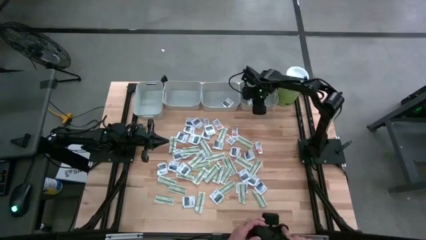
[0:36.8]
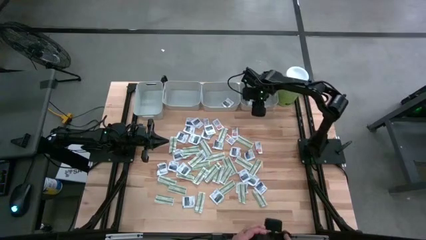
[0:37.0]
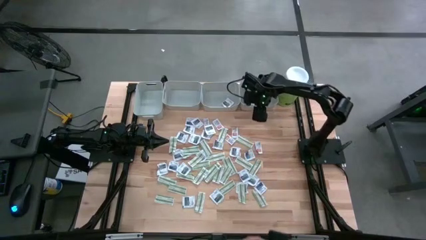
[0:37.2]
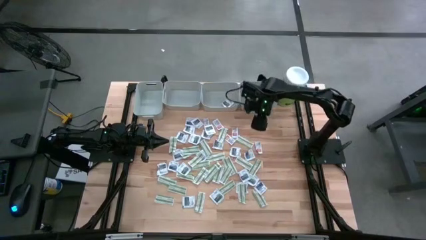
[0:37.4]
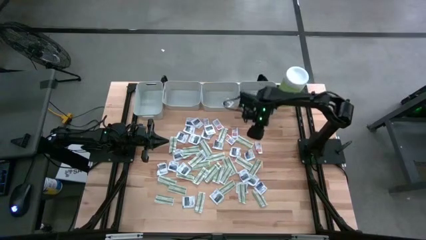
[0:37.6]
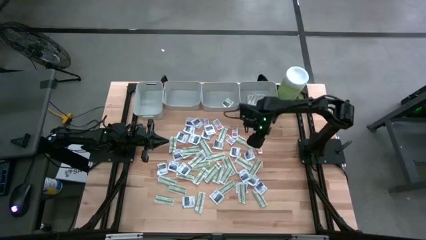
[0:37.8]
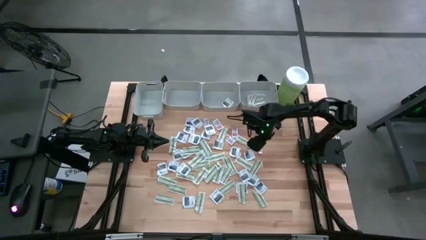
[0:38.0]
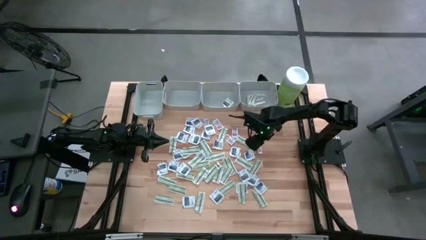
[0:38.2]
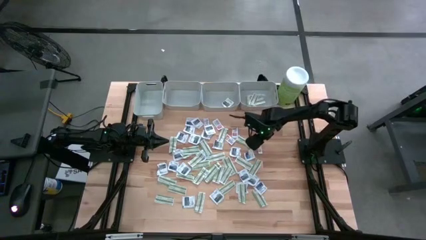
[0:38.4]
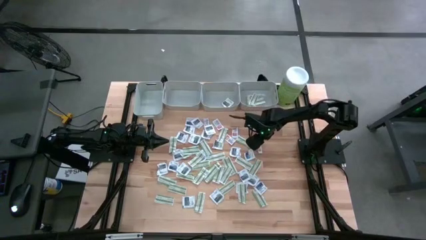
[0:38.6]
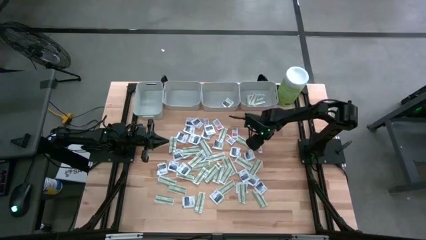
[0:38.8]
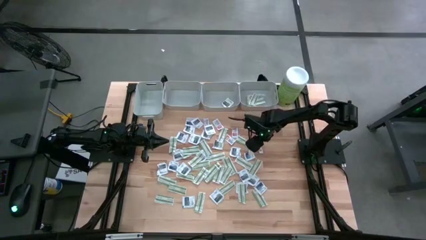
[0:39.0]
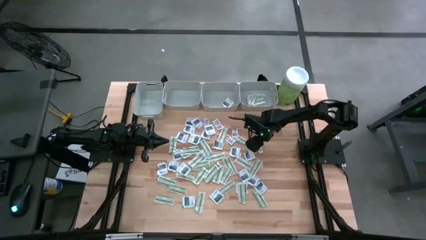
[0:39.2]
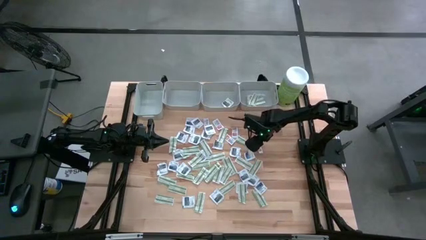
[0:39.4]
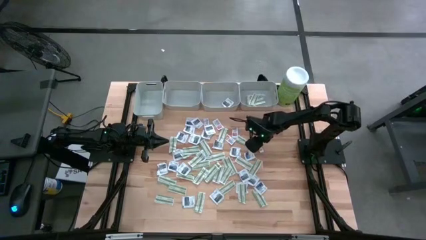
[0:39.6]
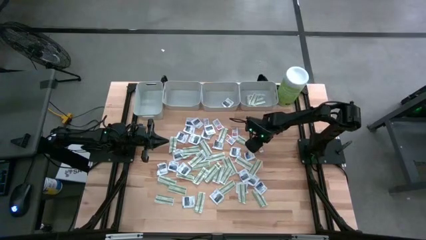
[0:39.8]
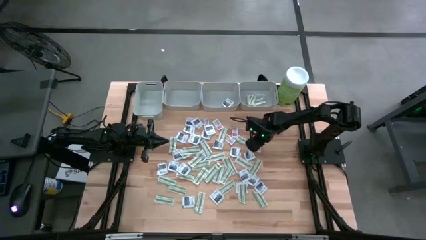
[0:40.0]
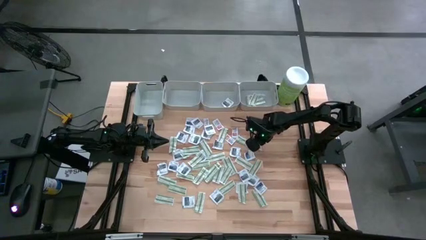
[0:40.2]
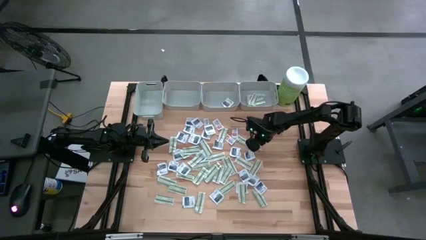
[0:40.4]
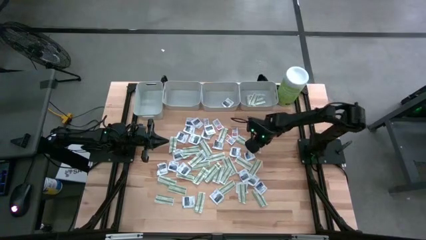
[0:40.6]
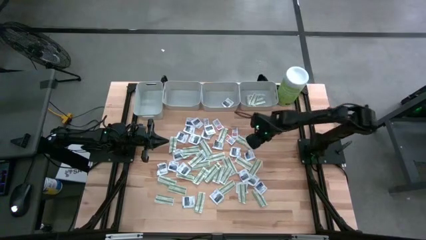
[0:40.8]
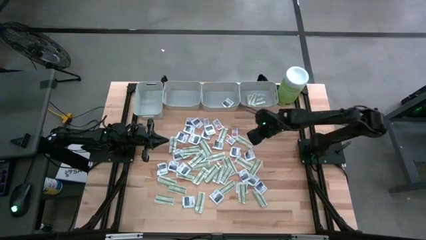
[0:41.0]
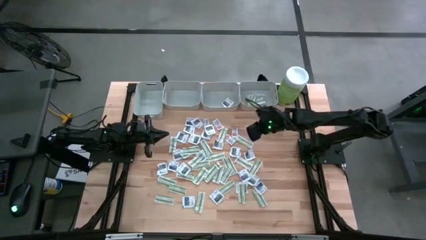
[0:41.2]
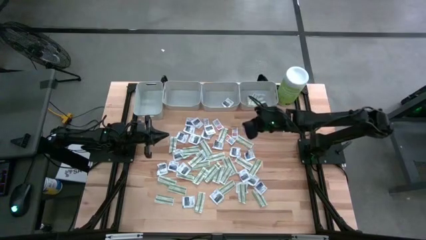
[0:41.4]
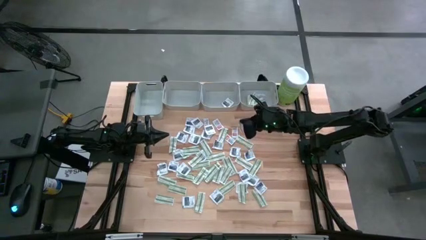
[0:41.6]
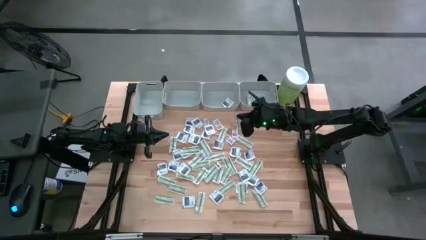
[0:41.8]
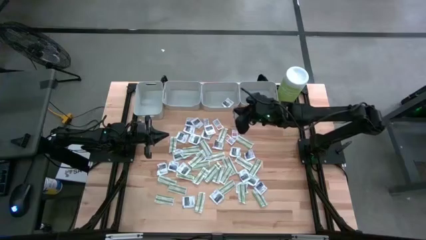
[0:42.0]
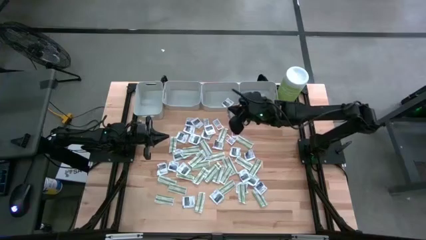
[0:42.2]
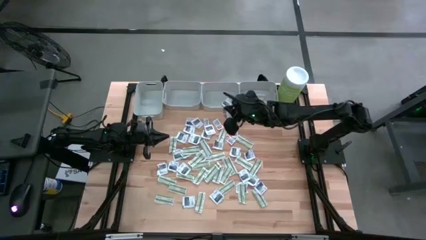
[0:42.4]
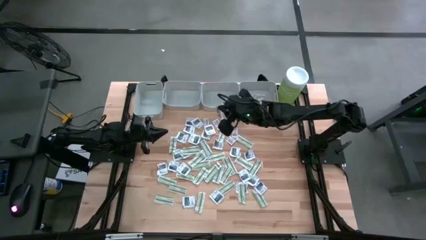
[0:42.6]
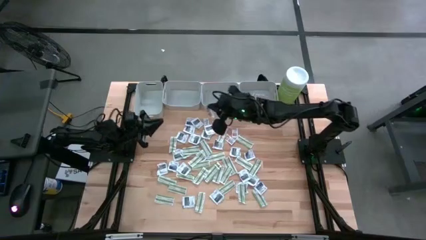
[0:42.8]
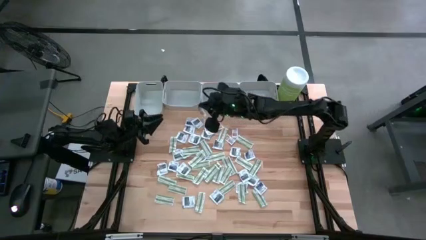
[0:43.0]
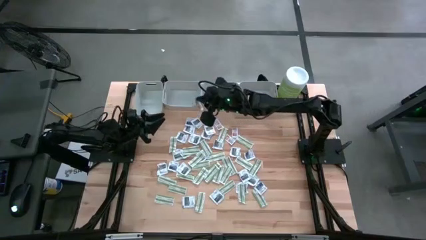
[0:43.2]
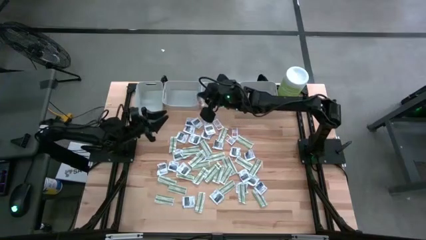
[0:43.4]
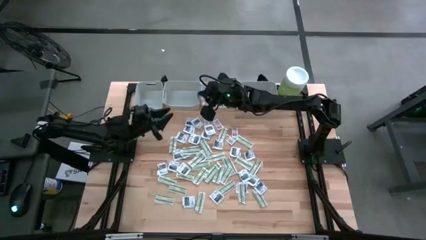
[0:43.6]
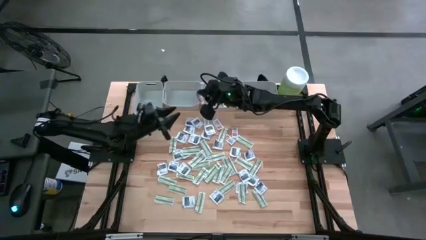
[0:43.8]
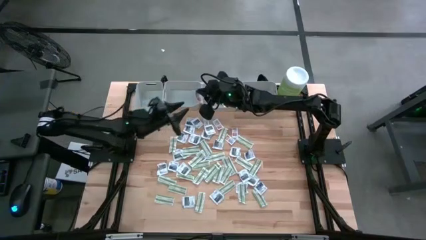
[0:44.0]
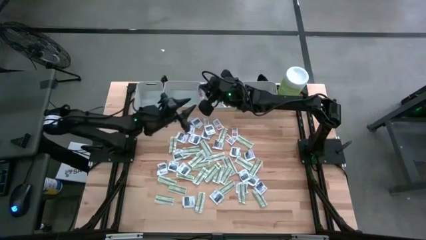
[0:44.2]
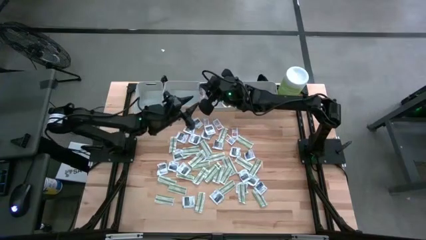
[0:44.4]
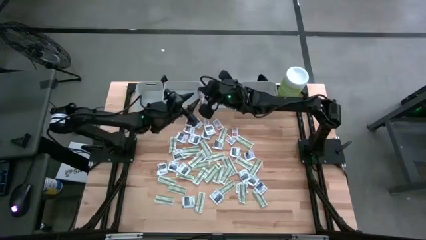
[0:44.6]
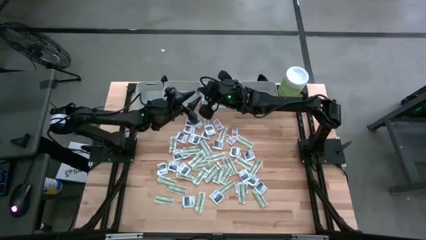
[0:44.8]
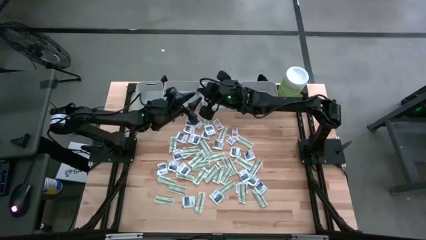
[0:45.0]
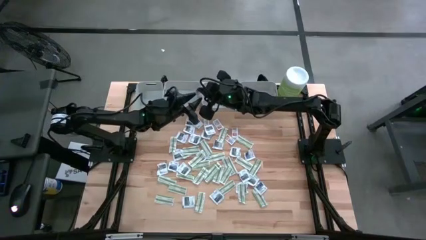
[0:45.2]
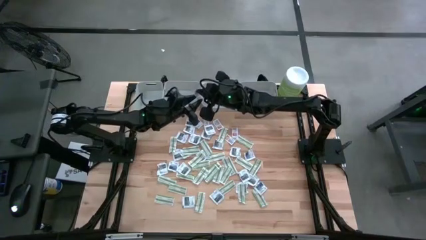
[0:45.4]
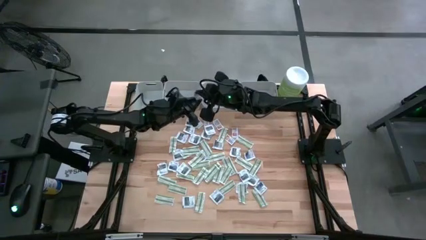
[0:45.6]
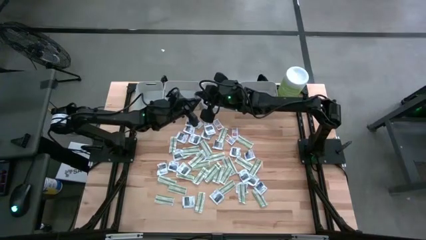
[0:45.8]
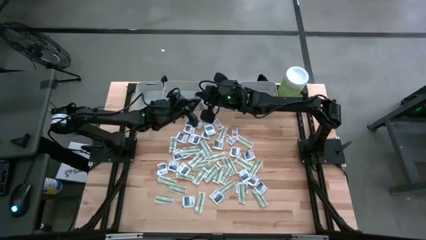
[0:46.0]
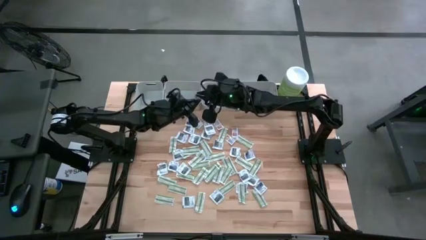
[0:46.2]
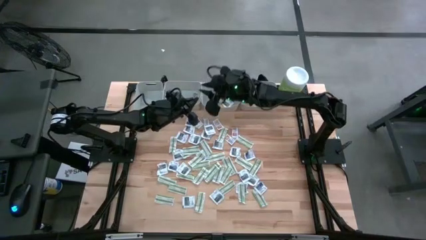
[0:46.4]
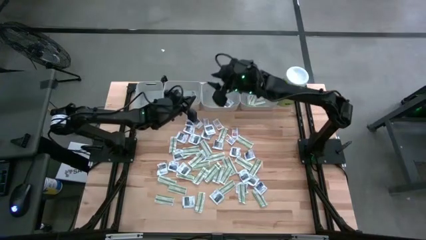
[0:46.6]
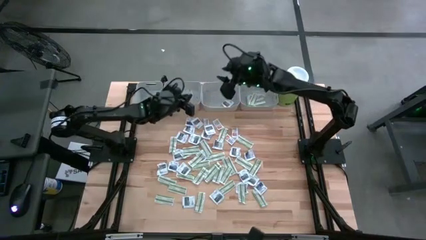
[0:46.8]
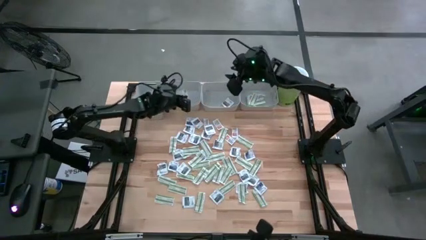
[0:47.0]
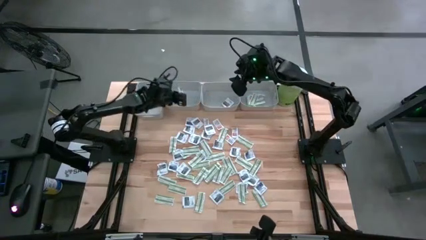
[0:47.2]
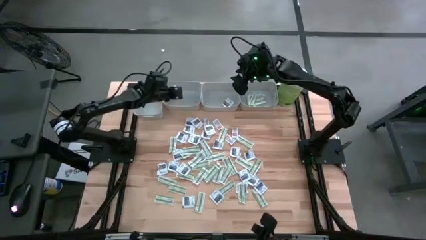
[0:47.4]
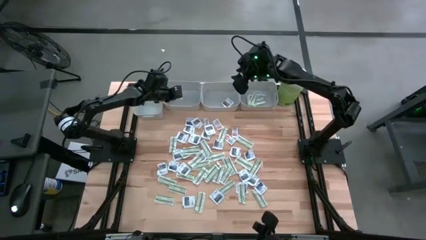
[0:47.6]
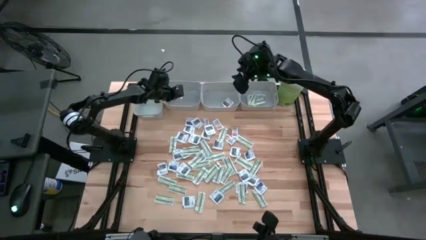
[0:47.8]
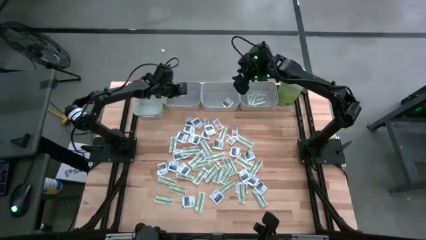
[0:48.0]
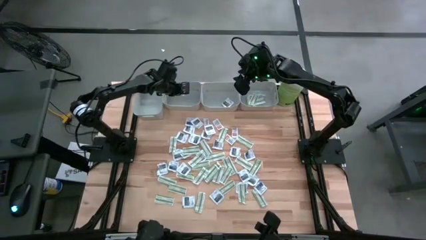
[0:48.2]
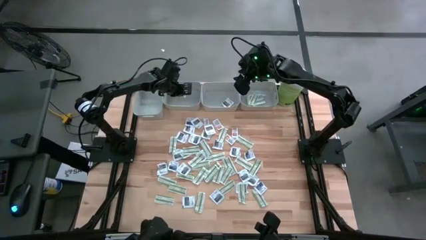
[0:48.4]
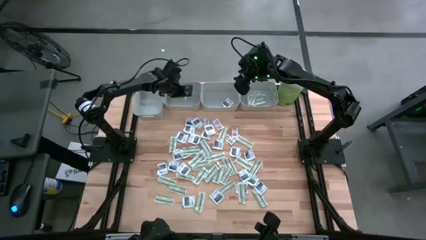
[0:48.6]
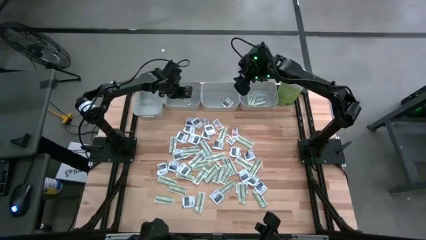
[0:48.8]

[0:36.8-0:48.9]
Task: Pick & Place First Aid Supplies
Put the orange ointment pack into the middle left gray bin

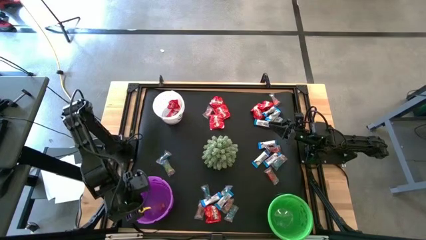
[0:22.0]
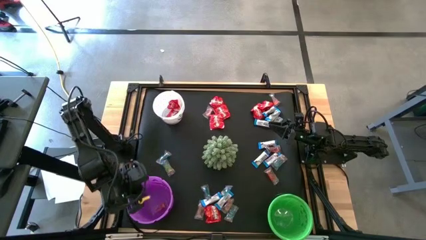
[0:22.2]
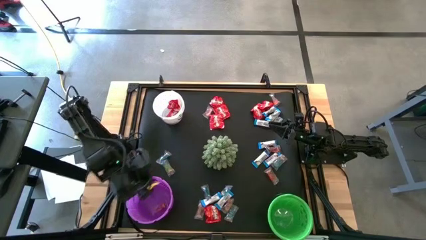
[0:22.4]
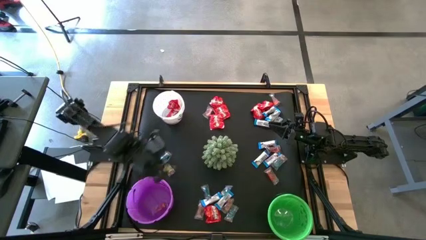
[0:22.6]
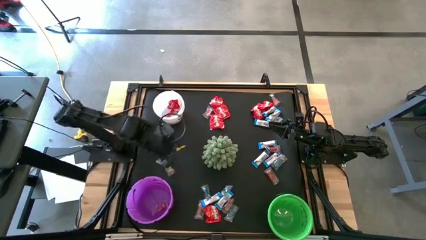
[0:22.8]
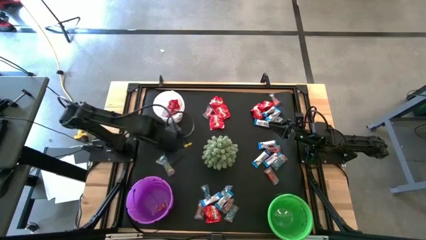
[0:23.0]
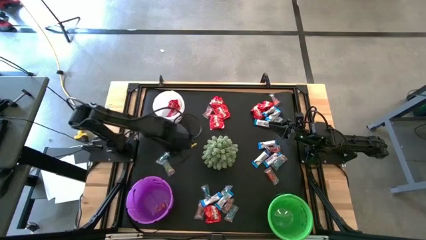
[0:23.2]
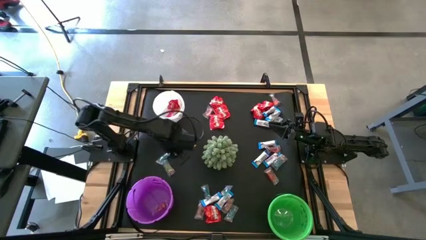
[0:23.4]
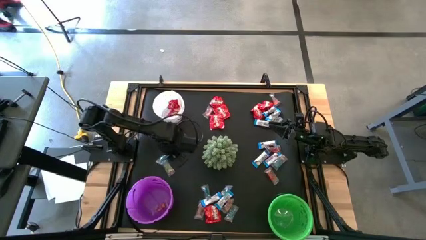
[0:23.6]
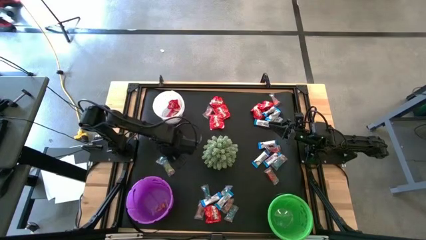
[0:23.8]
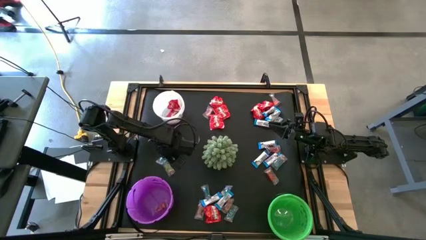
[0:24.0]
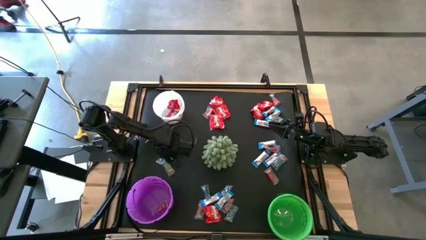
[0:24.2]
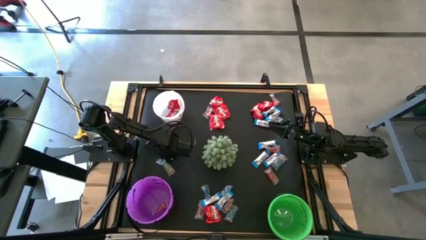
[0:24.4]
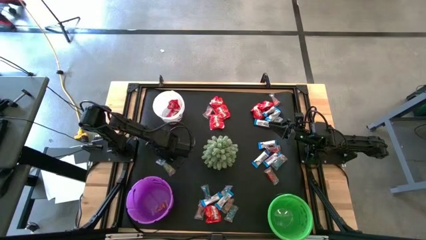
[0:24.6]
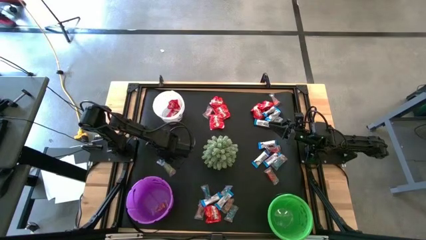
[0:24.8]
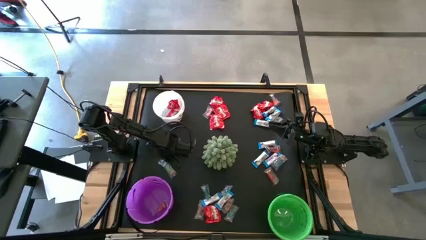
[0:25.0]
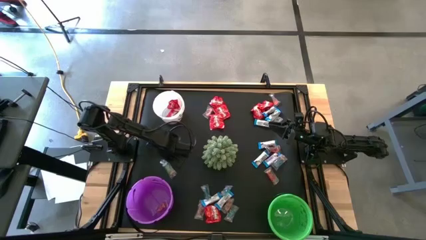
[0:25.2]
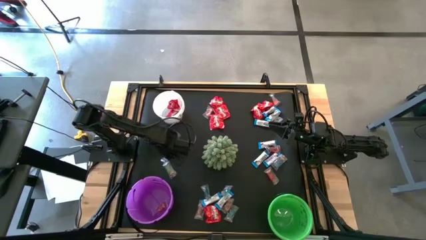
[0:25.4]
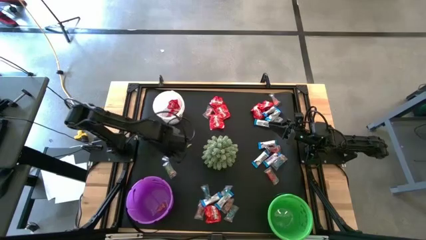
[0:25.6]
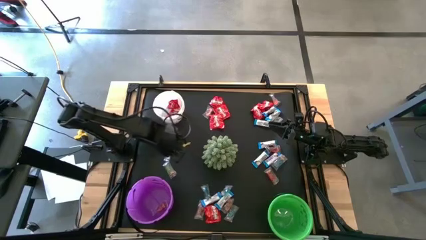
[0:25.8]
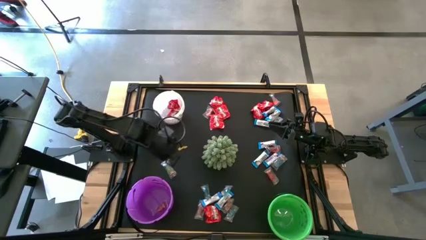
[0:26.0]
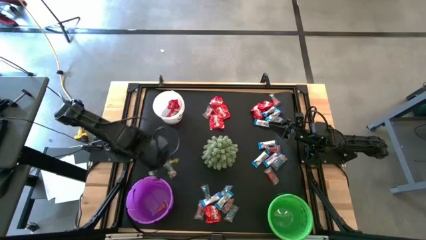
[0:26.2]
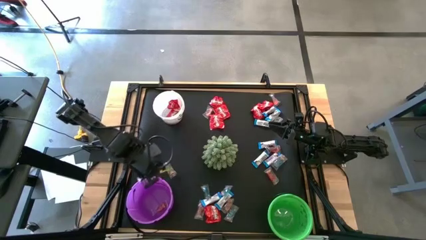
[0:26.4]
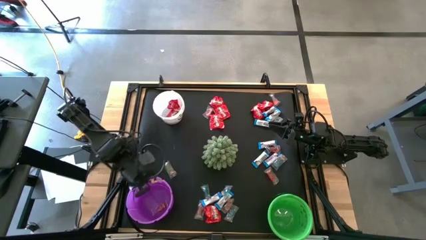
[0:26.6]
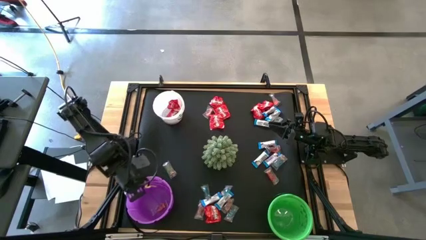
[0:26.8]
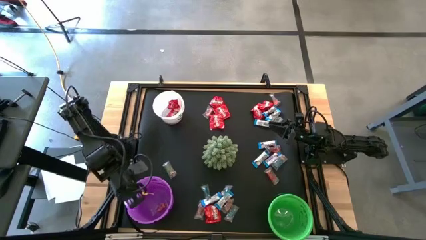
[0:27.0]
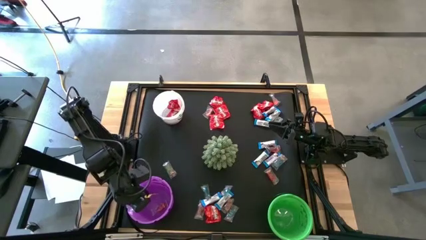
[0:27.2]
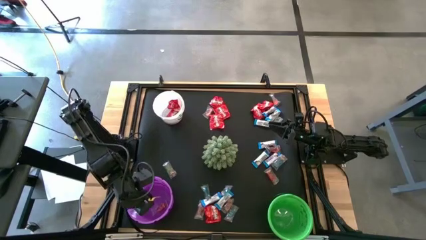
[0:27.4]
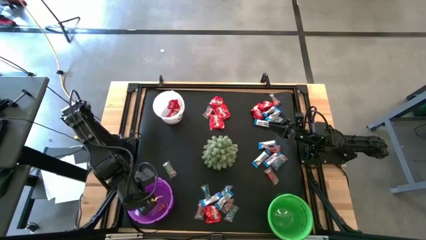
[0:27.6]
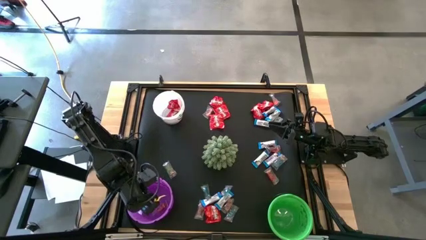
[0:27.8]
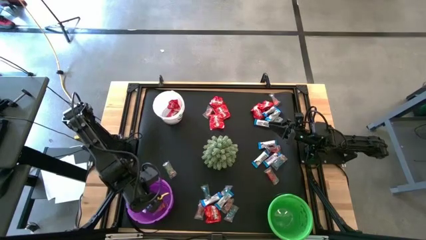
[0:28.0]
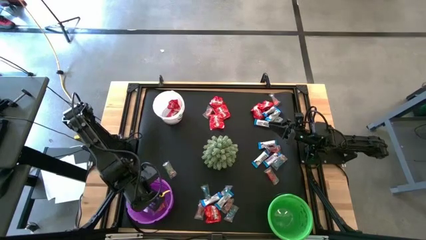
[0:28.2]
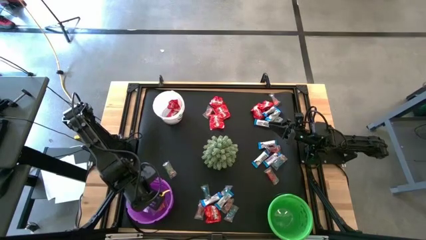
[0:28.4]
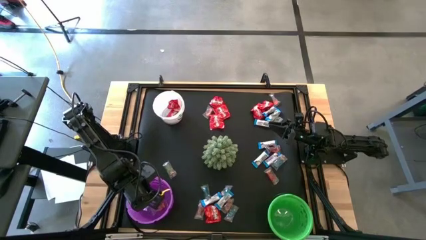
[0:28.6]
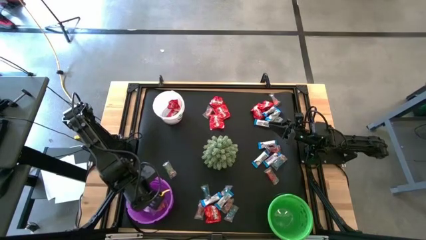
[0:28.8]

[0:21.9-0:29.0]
Task: Organize candy in baskets
Put the blue gummy into the purple bucket
